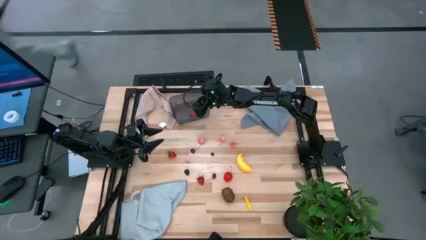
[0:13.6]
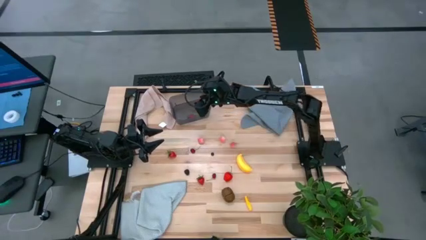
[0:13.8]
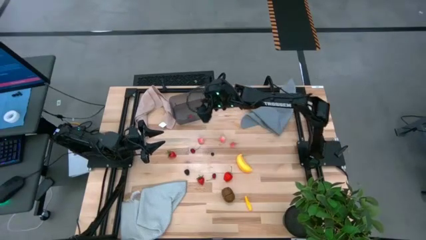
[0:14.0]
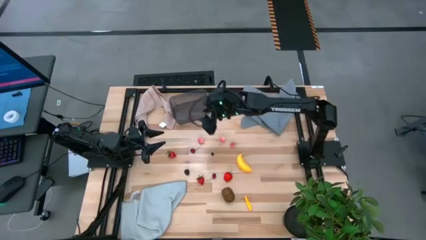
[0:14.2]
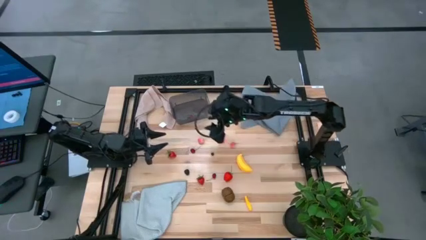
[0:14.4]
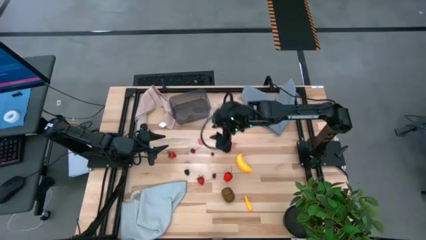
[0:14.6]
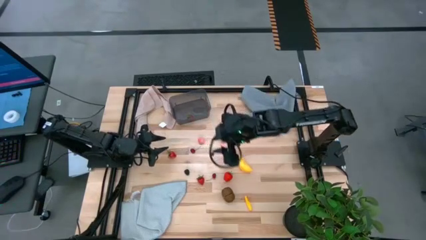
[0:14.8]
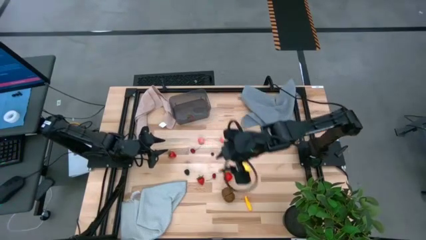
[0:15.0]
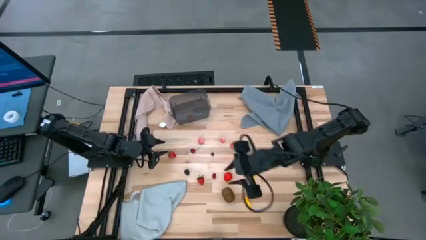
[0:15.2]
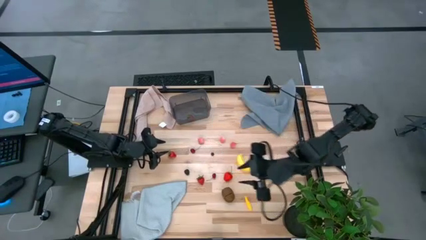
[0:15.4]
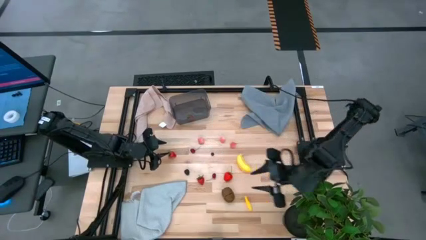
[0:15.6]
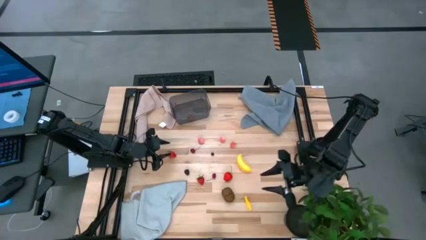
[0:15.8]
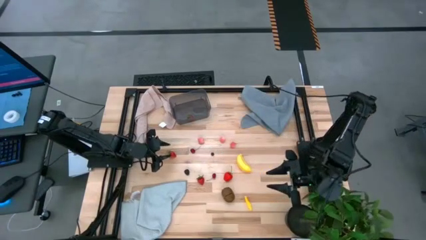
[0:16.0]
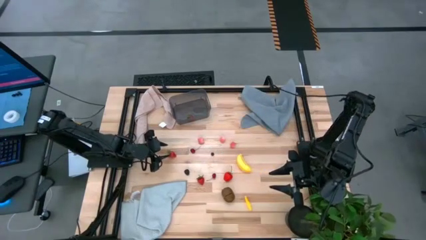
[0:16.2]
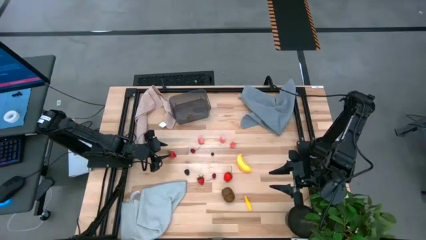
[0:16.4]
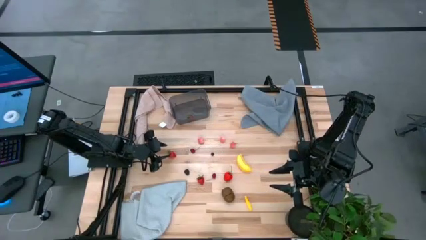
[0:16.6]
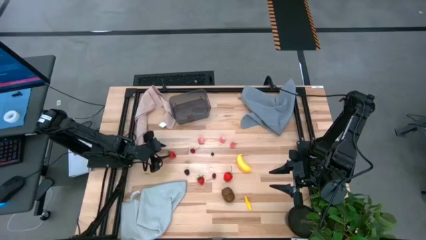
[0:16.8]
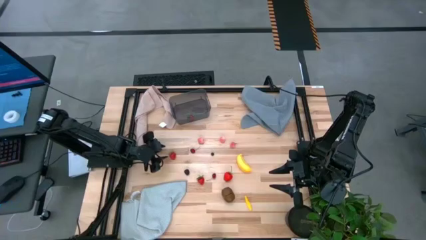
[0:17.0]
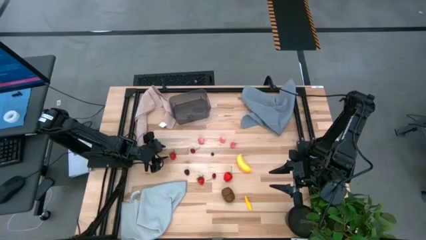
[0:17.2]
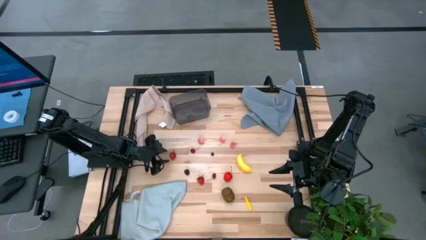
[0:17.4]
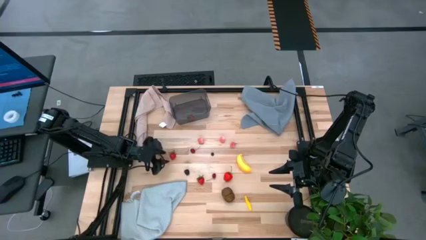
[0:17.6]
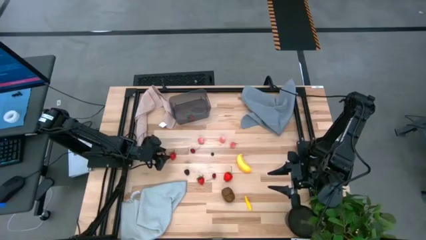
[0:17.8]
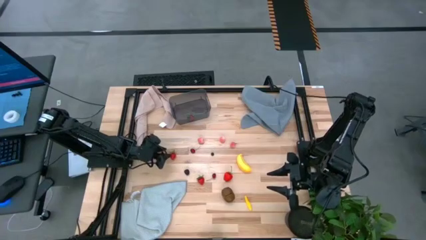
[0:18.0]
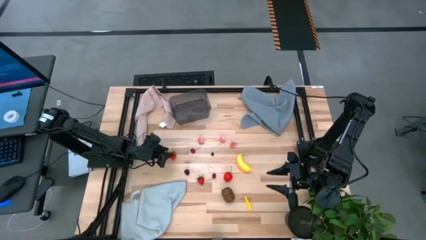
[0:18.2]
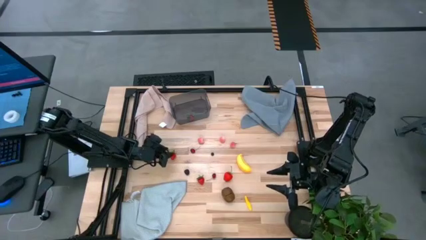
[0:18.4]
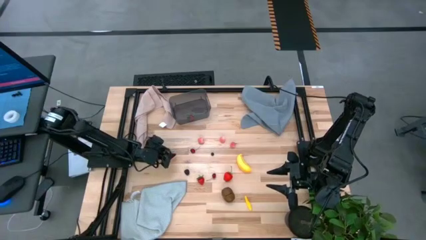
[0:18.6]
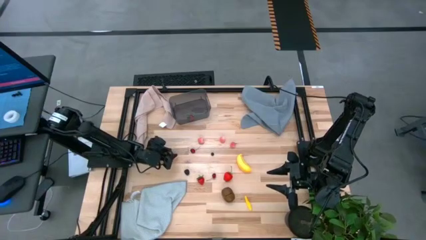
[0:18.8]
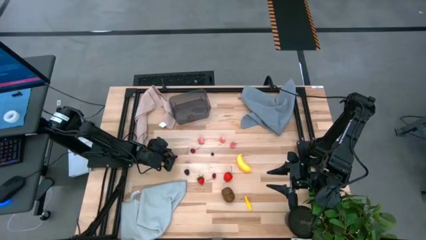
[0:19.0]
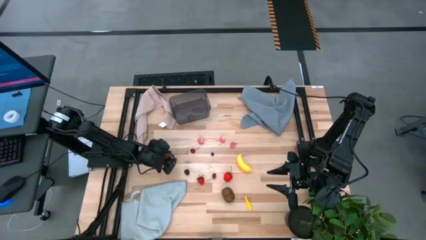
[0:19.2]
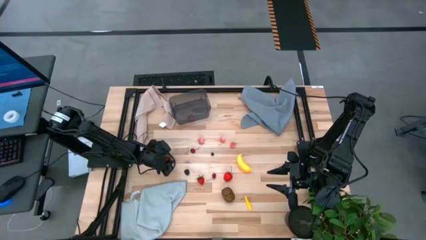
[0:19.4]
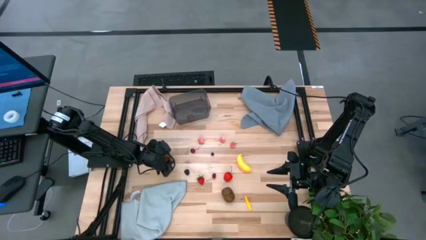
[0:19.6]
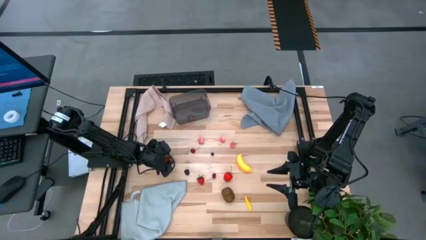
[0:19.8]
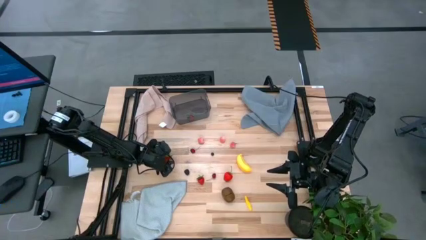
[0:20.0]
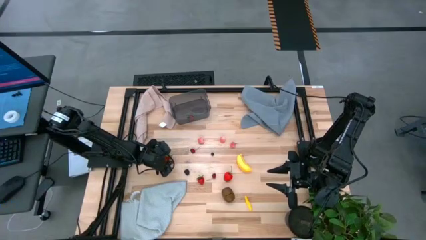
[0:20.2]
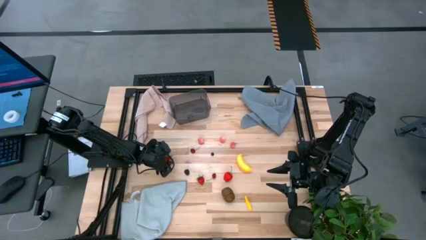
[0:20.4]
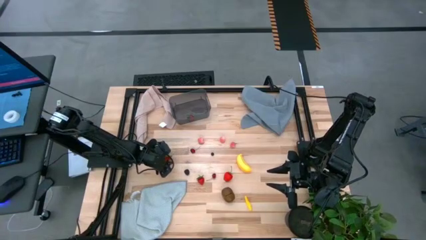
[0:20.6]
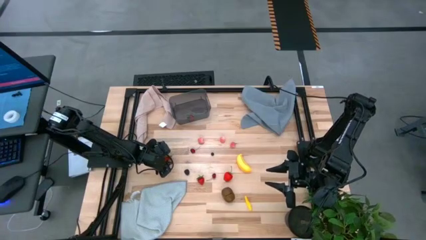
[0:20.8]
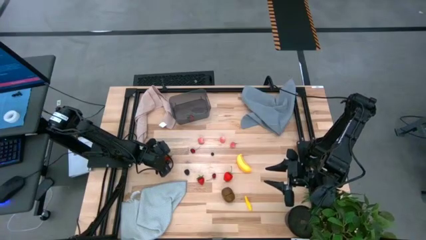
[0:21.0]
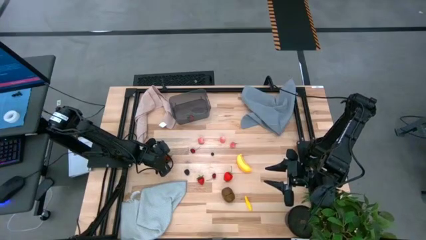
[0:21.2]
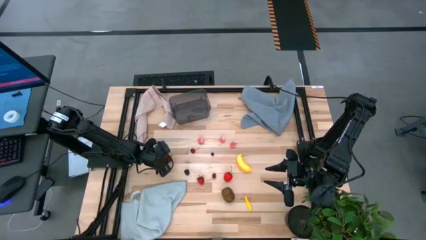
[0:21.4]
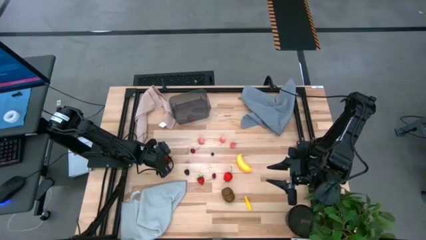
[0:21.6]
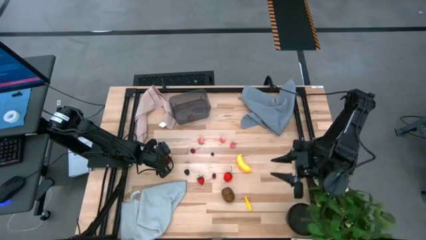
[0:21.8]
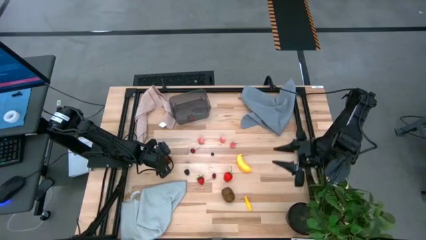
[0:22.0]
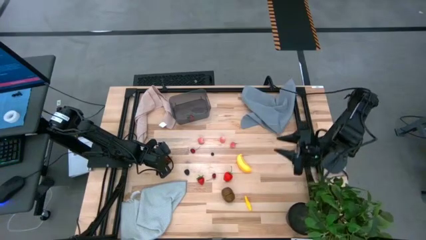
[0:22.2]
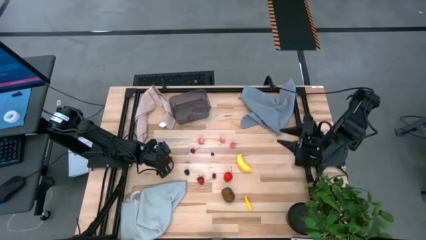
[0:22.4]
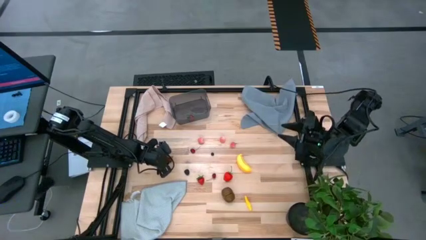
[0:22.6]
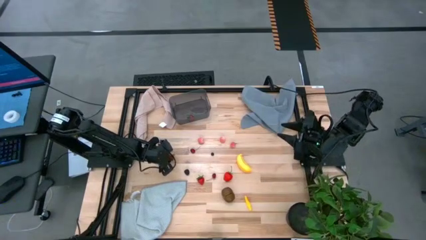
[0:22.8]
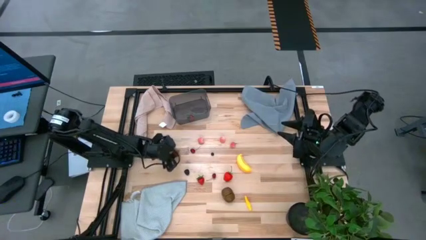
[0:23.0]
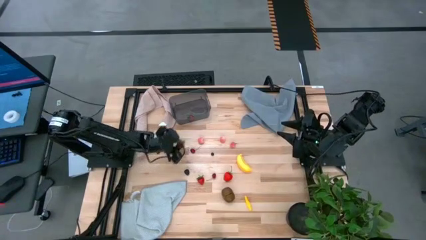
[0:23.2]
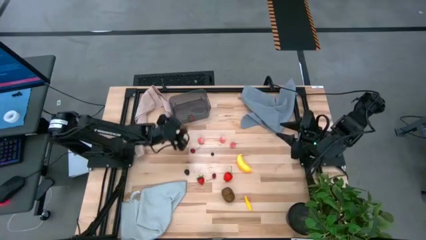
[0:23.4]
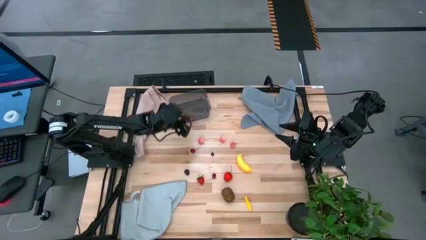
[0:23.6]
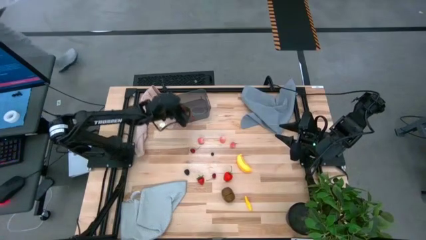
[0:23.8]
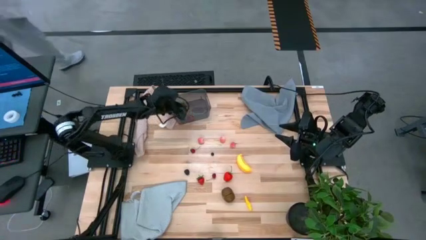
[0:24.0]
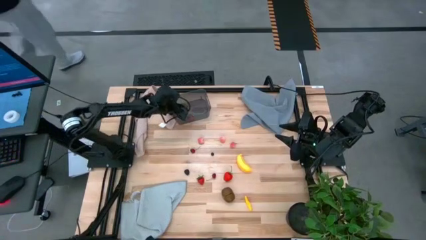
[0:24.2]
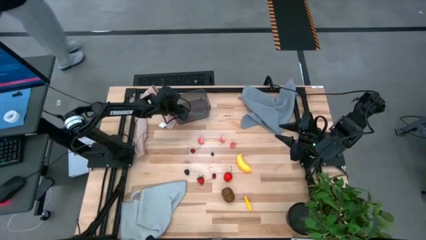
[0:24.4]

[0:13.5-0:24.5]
Task: Pick and placing Produce into tupperware
Put the red strawberry into the black bin

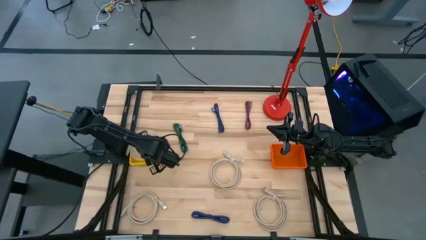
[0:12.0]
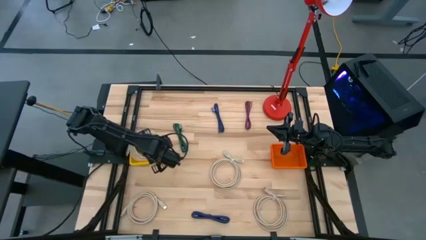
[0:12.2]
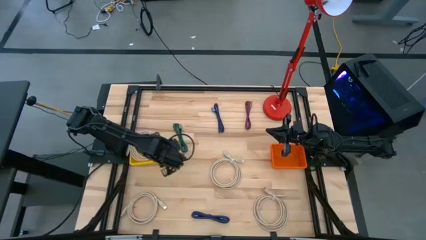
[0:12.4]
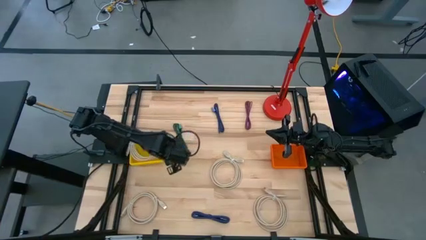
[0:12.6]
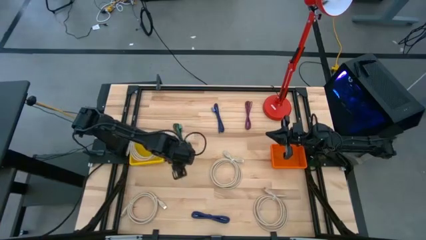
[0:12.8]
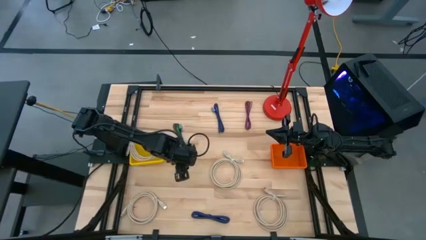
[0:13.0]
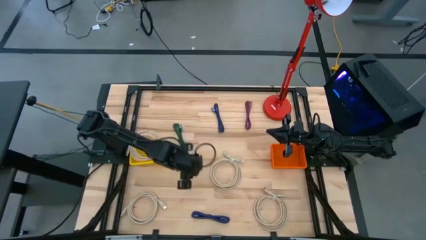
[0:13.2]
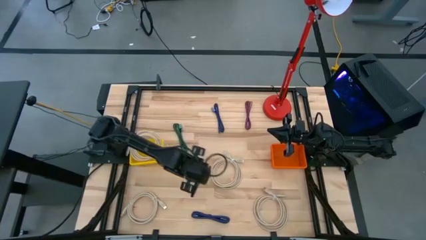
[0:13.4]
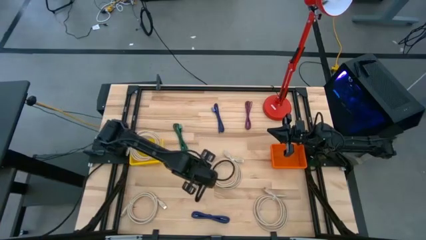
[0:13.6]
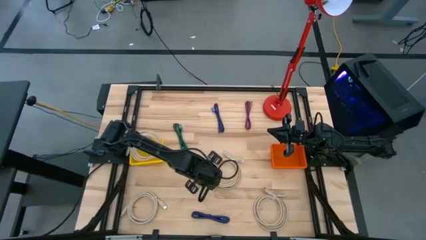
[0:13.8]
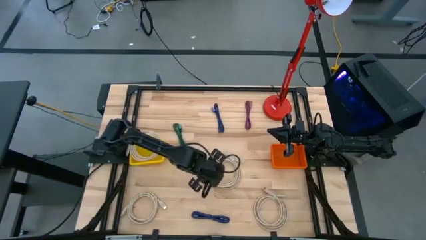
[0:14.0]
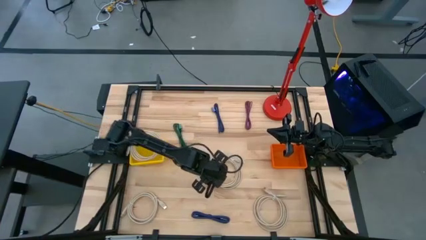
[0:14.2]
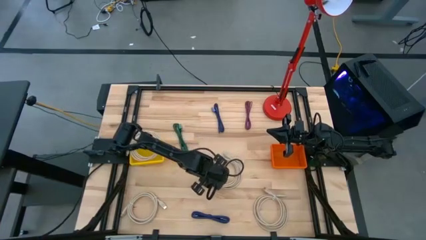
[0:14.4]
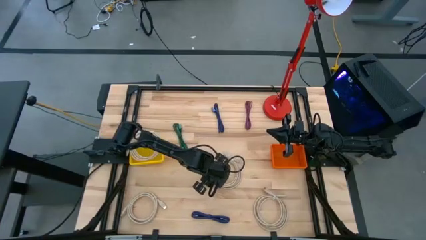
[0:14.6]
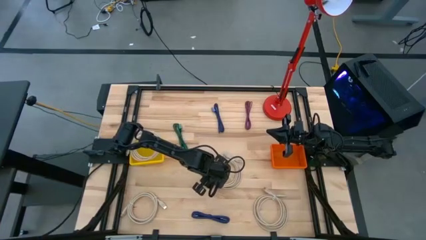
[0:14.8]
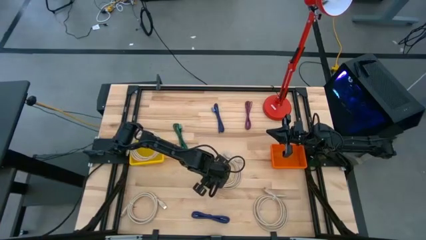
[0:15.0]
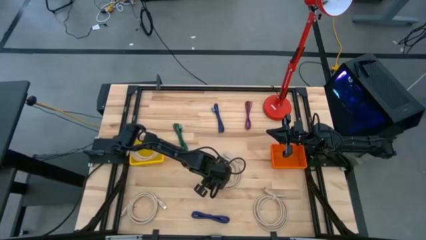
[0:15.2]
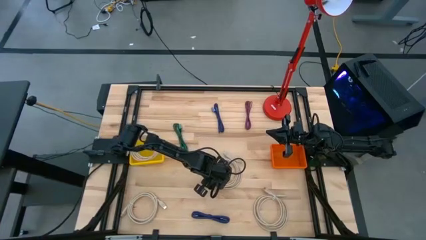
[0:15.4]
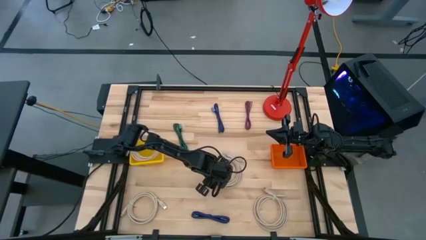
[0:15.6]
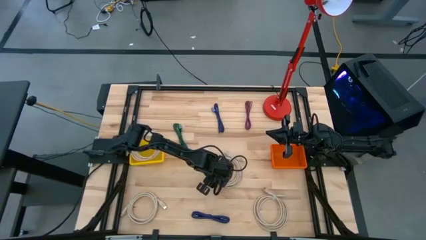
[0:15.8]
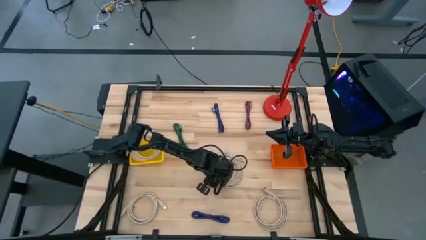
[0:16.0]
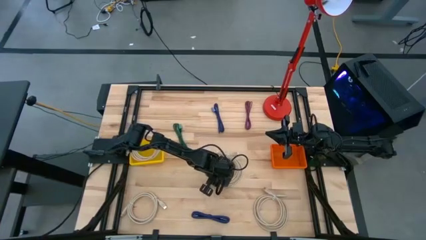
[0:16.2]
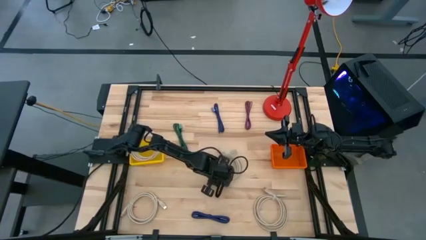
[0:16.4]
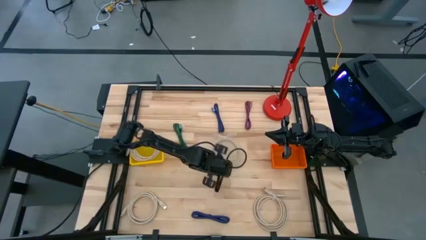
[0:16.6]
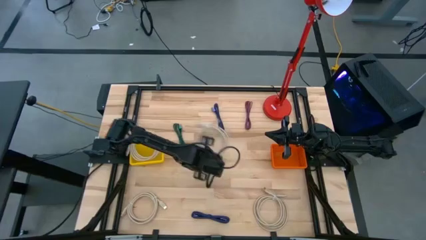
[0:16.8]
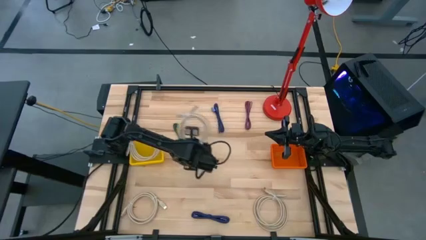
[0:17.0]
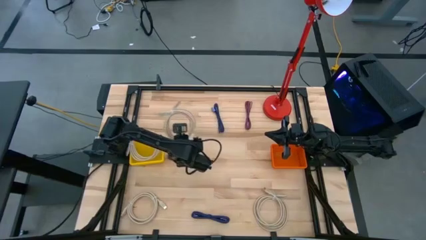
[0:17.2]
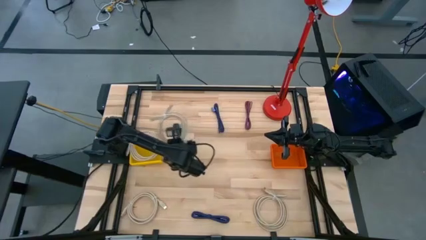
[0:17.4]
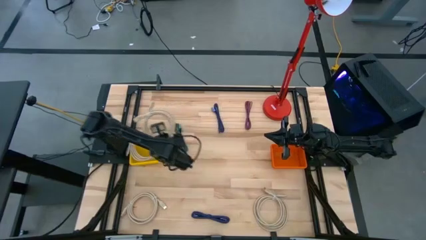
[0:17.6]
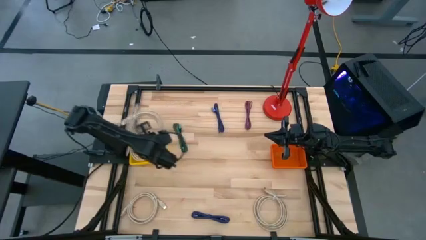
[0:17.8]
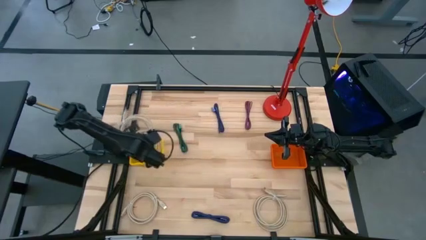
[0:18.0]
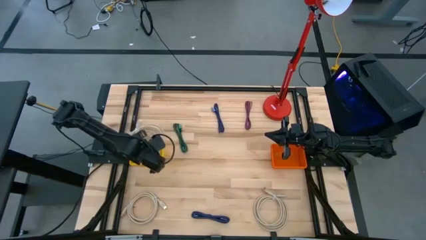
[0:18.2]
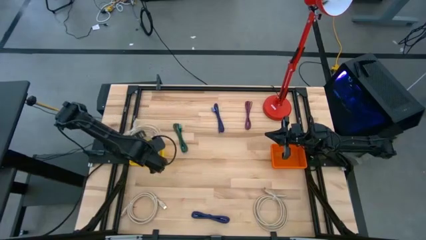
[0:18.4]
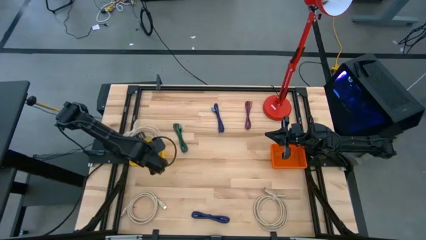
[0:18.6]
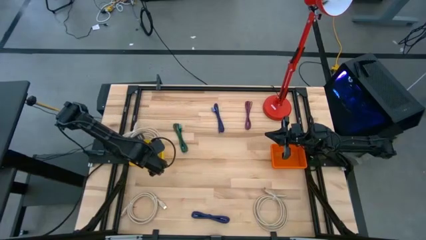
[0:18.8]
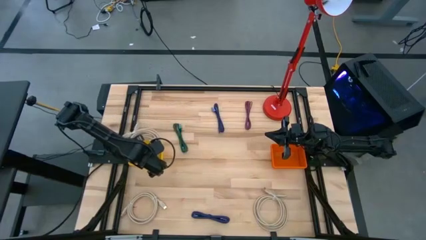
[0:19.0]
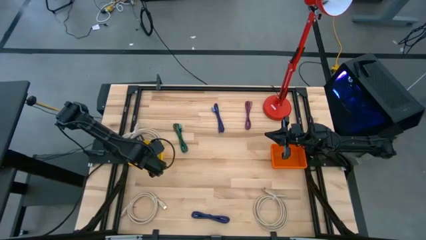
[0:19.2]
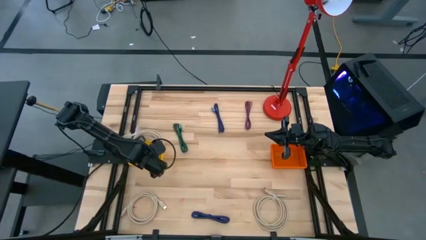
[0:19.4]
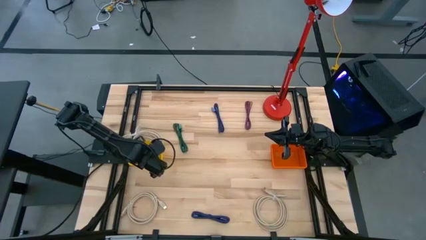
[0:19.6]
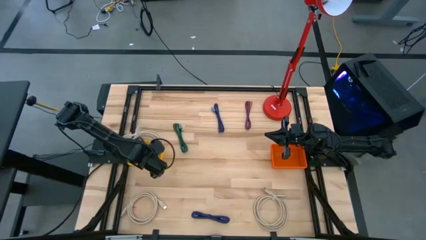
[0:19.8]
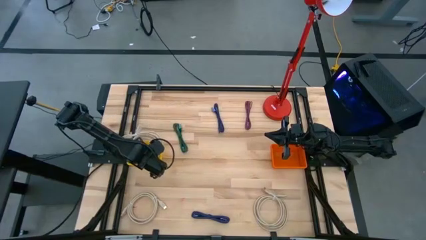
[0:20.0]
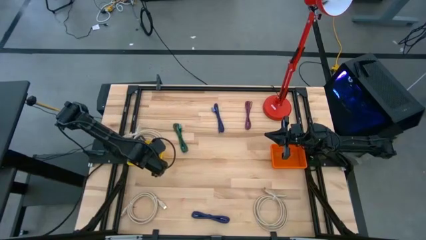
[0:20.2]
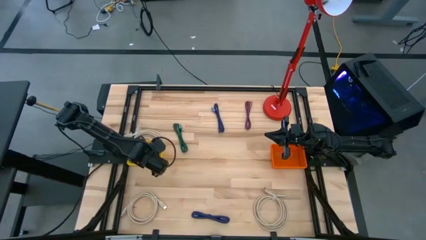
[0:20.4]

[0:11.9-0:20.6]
Task: Pick & Place USB Port
Put the brown HDMI cable into the yellow basket
